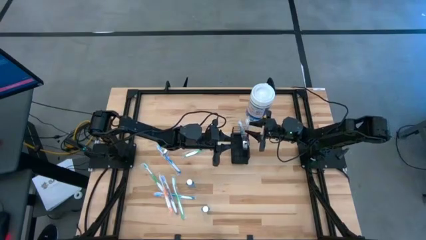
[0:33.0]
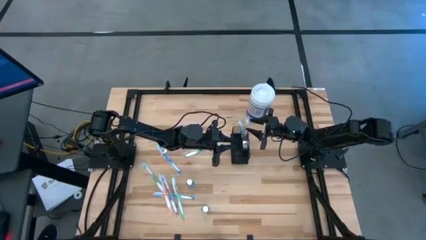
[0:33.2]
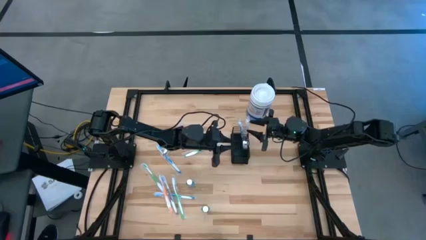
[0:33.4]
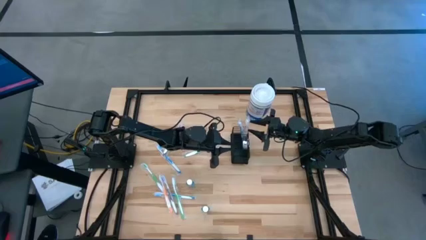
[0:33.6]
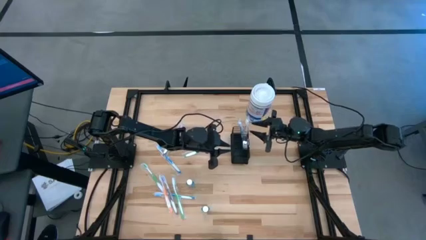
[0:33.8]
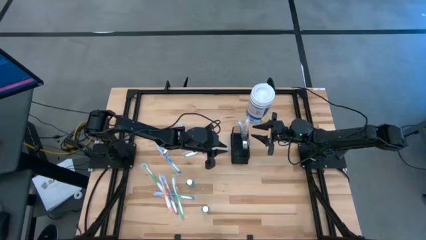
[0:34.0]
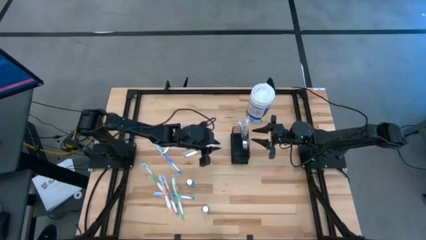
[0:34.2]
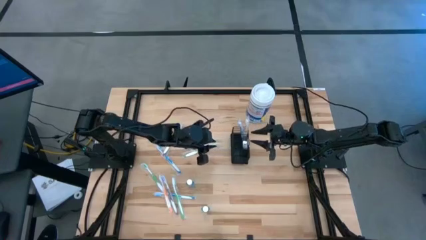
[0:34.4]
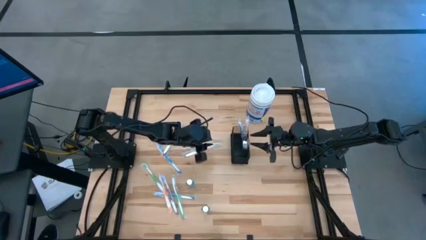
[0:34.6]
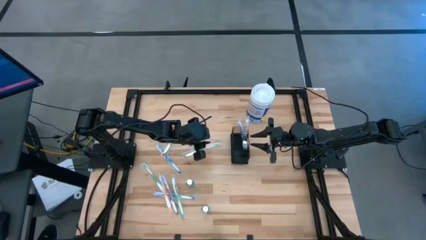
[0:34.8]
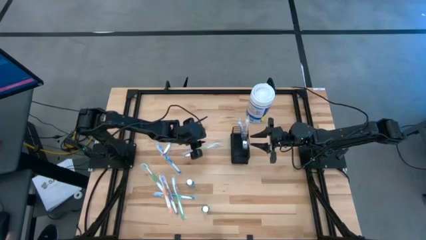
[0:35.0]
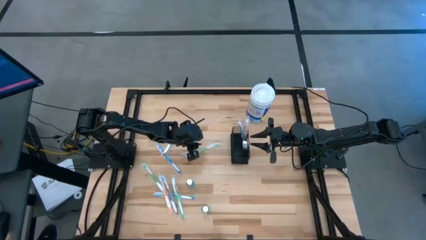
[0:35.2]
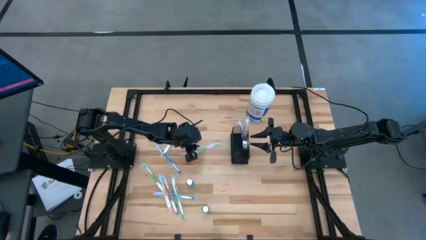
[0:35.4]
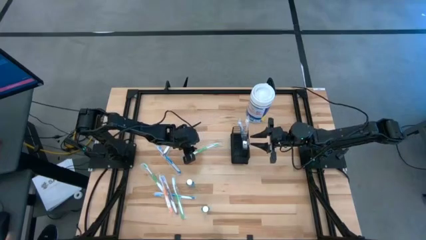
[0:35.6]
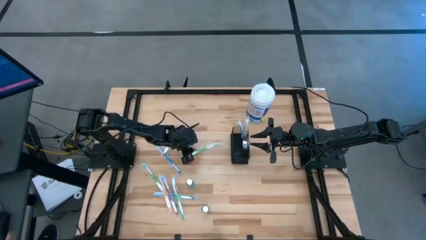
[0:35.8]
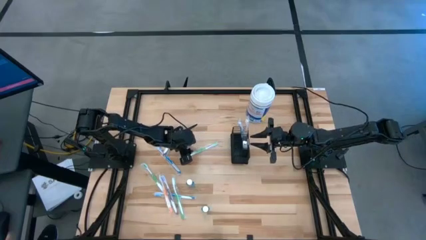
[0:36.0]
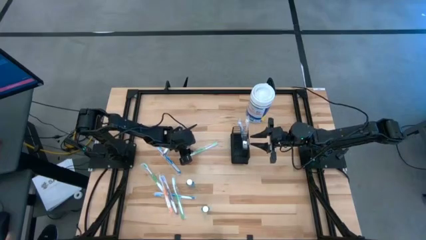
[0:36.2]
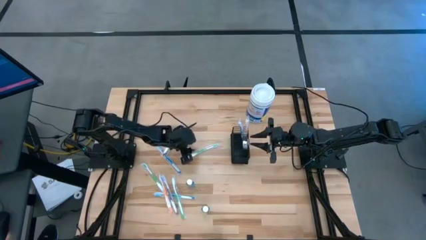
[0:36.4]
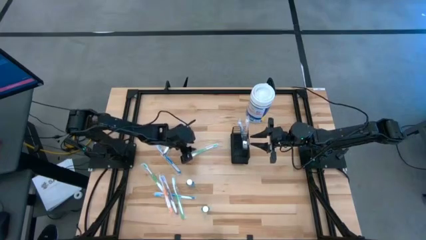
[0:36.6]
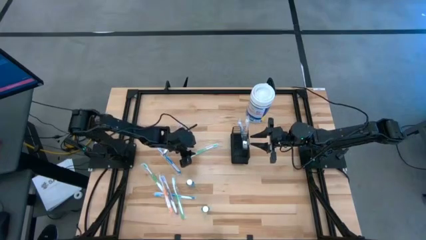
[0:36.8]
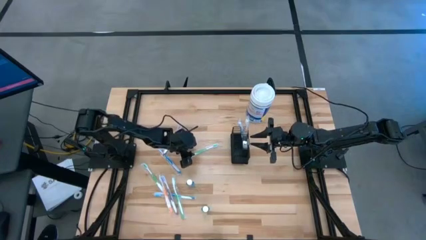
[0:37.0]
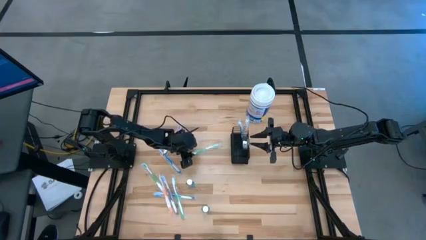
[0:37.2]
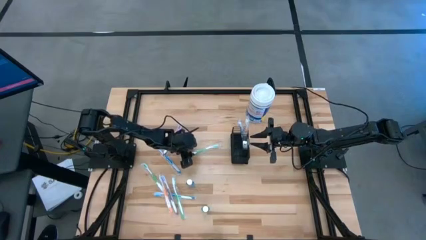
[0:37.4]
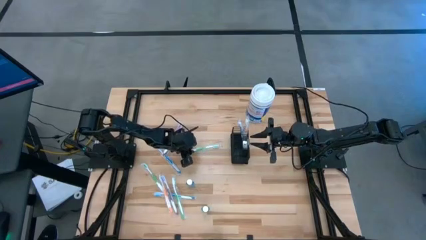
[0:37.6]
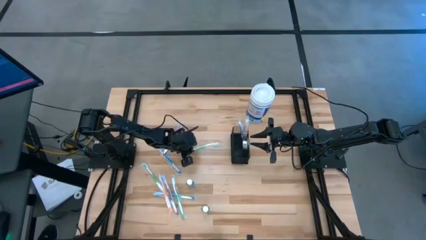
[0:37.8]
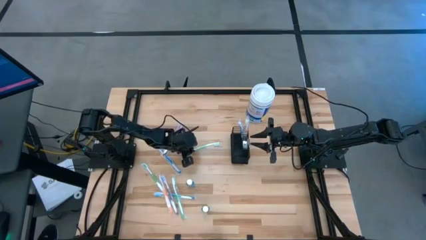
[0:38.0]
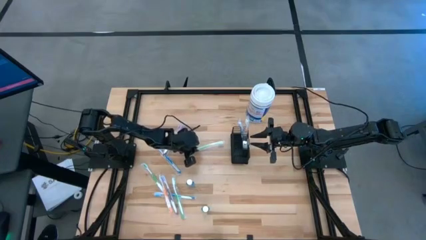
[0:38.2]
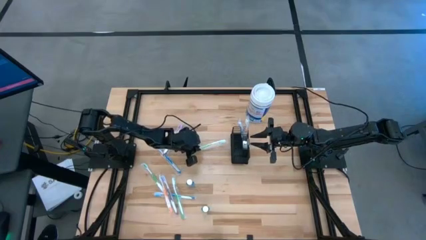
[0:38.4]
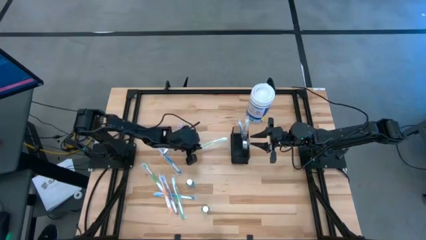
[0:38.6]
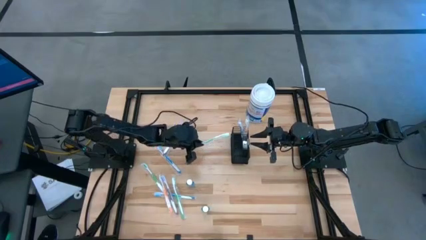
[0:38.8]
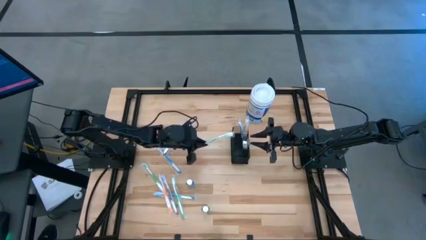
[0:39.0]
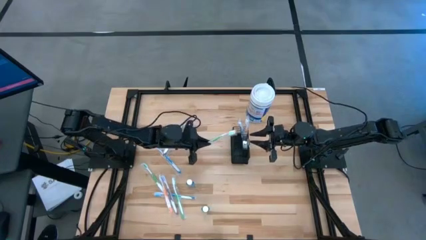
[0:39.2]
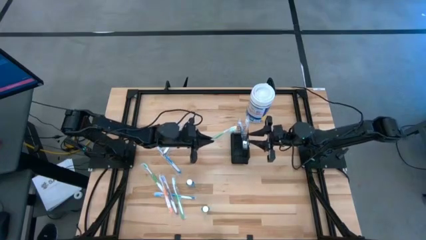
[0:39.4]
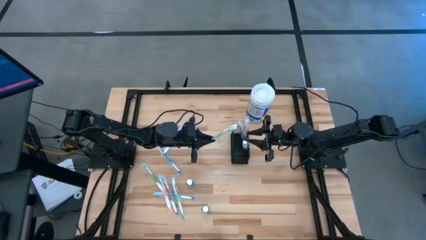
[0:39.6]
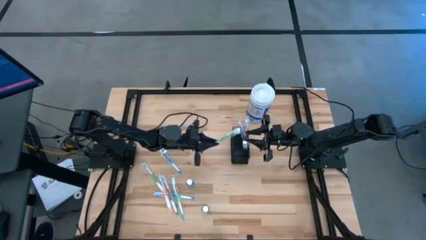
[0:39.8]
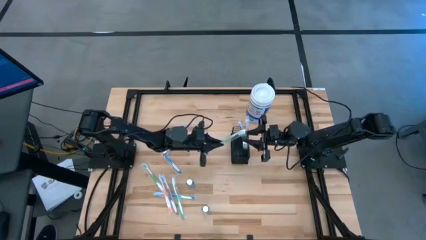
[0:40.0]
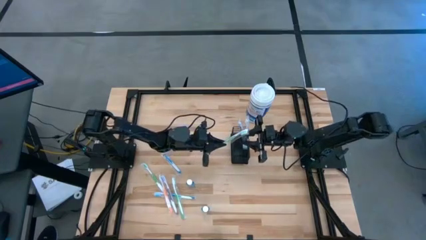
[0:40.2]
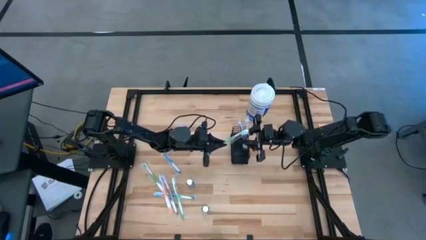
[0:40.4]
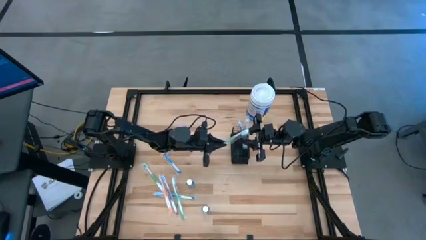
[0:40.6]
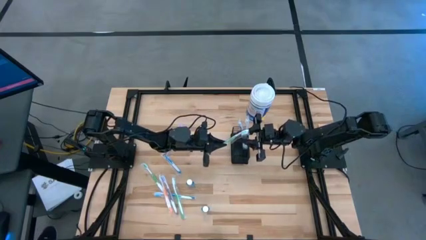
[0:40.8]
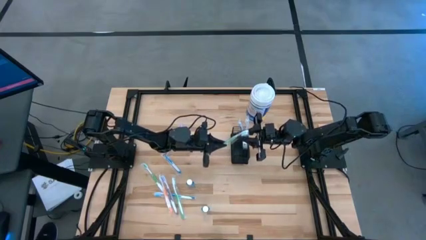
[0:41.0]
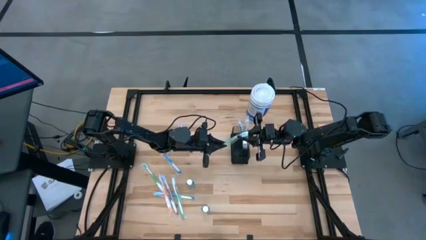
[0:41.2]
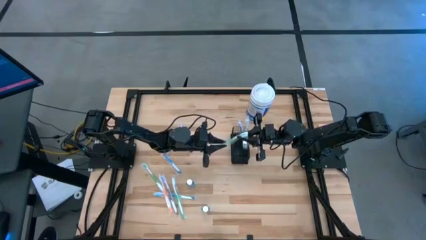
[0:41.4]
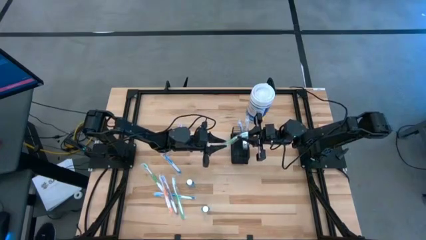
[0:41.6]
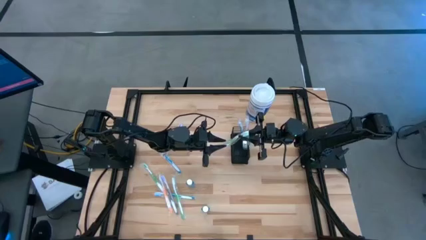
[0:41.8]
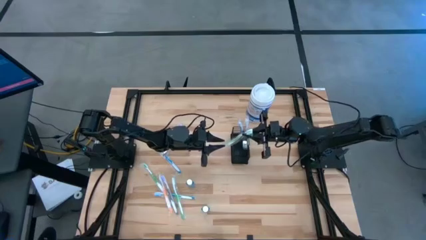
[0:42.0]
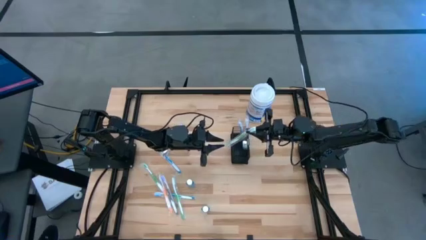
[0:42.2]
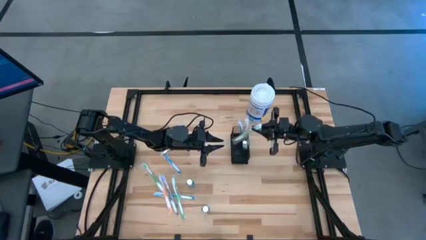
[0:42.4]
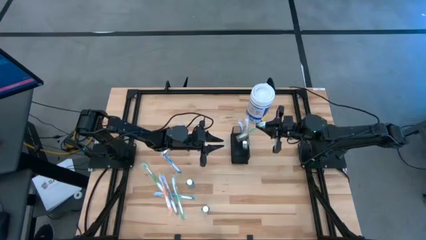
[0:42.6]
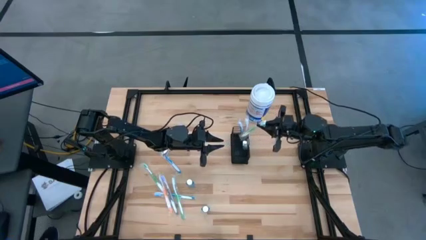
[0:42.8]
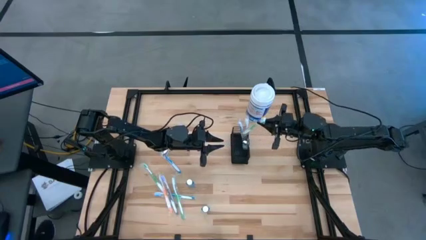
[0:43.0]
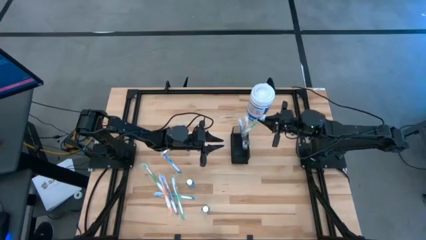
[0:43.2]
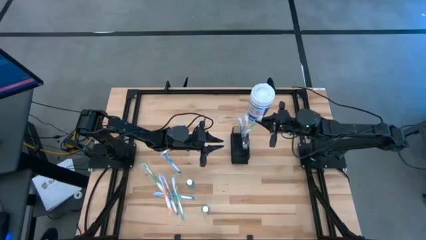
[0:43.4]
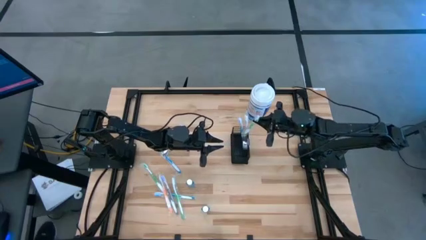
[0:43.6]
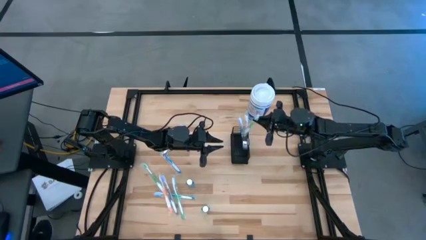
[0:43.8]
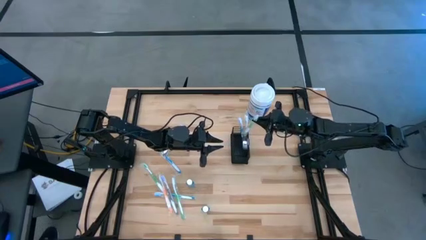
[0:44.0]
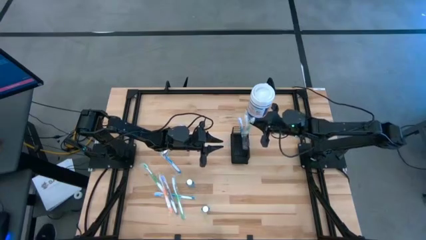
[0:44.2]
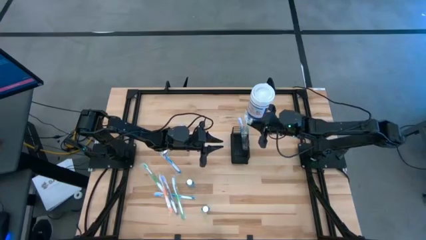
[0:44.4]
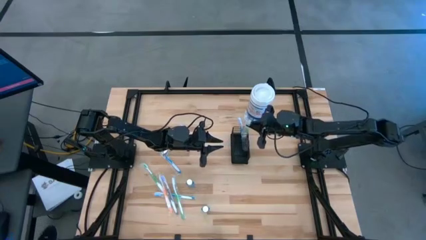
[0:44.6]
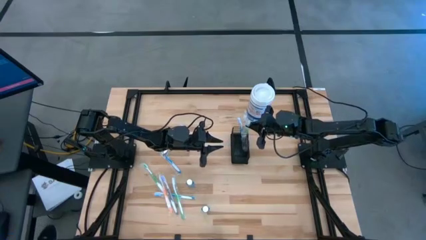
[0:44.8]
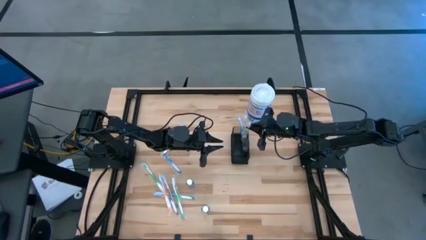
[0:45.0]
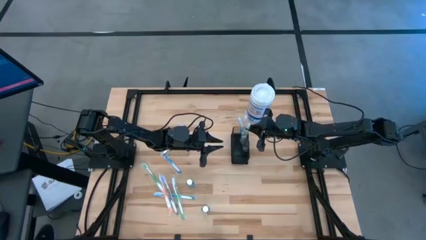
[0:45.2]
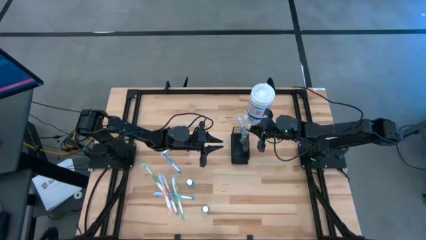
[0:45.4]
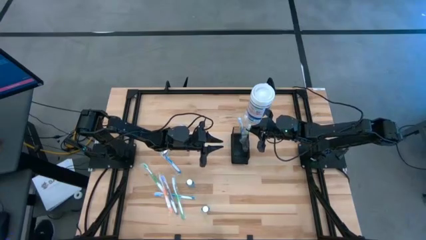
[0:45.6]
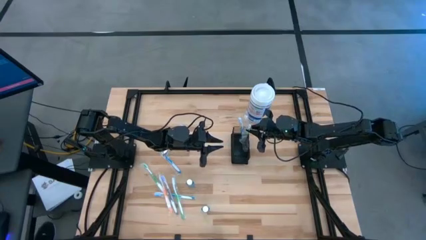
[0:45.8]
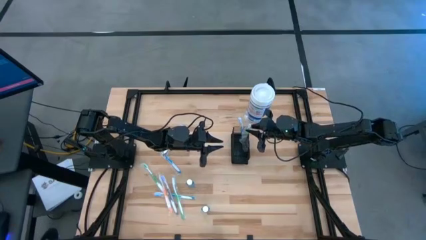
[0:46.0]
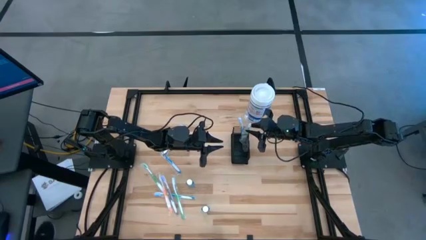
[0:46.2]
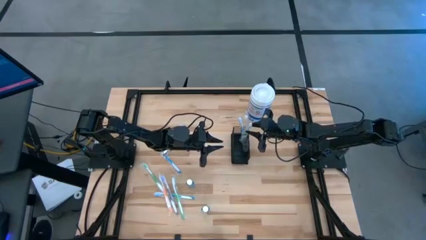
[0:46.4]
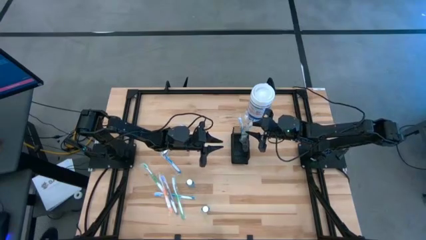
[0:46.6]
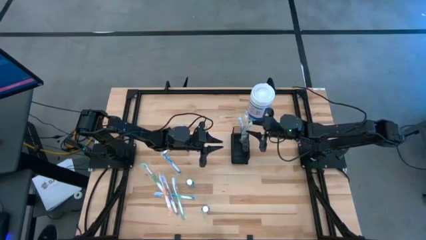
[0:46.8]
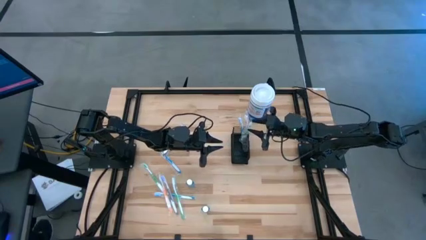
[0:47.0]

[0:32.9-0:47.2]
Task: Pick & Place toothbrushing station
Put the top green toothbrush into the wire mesh organizer

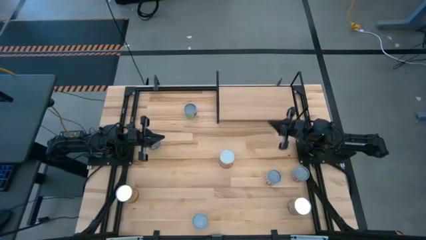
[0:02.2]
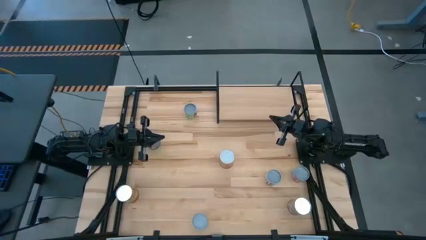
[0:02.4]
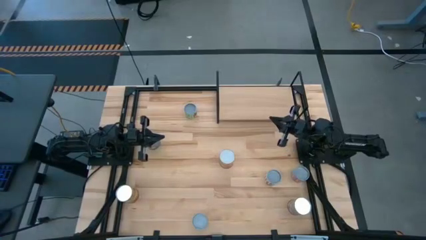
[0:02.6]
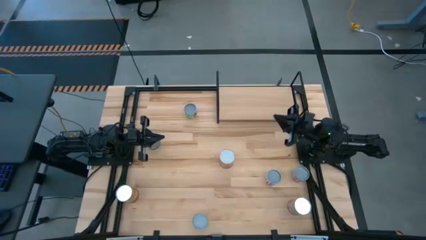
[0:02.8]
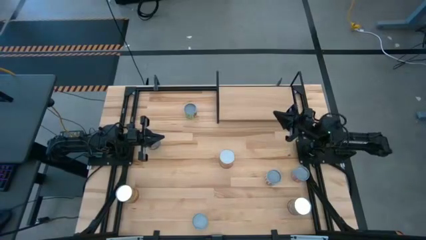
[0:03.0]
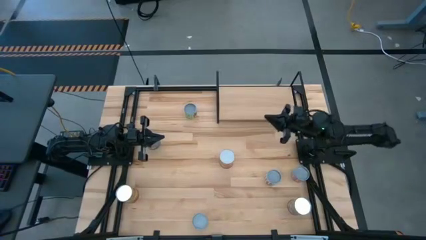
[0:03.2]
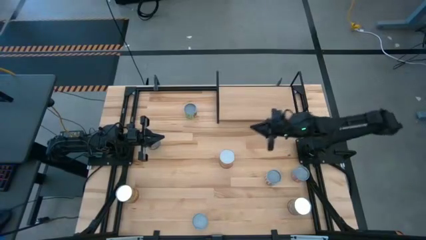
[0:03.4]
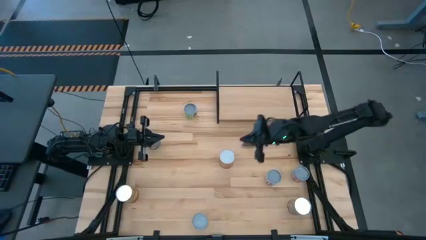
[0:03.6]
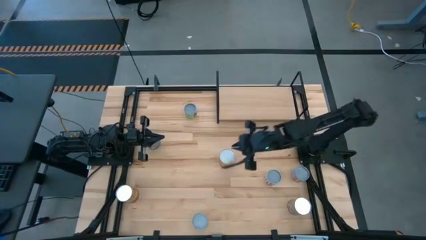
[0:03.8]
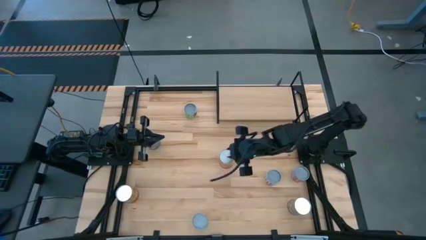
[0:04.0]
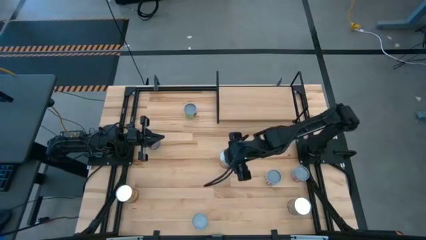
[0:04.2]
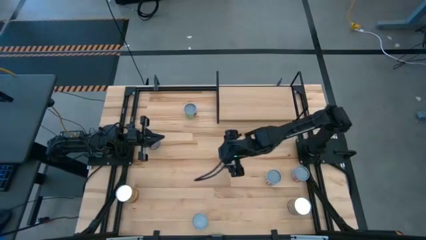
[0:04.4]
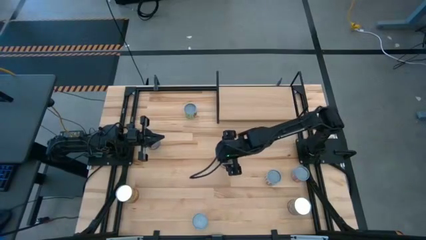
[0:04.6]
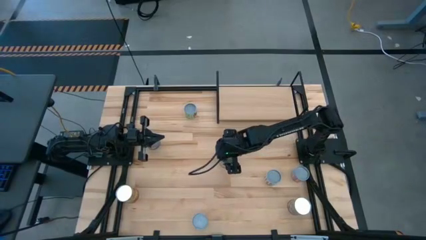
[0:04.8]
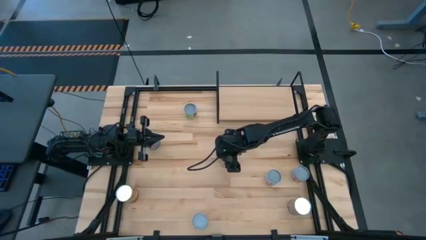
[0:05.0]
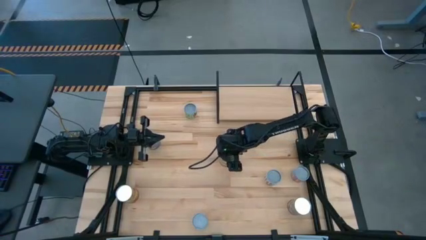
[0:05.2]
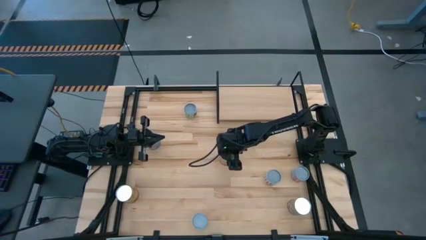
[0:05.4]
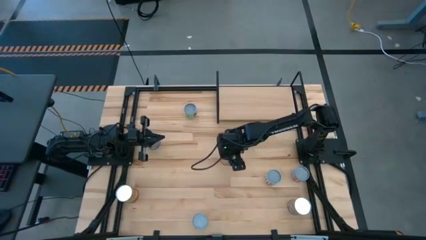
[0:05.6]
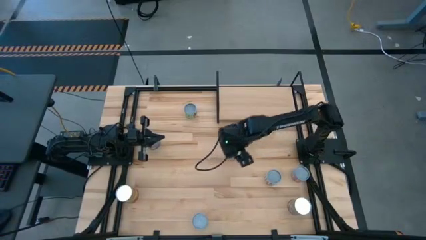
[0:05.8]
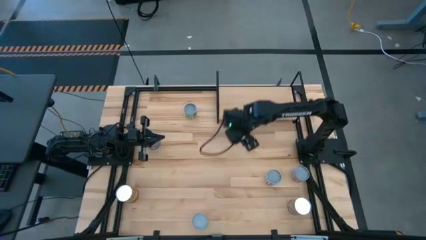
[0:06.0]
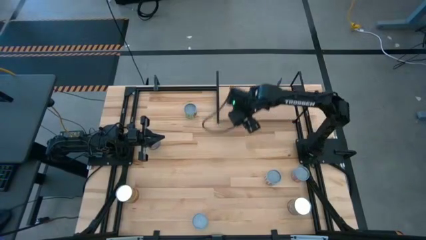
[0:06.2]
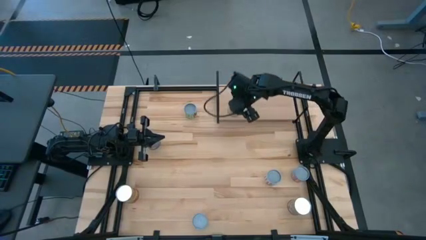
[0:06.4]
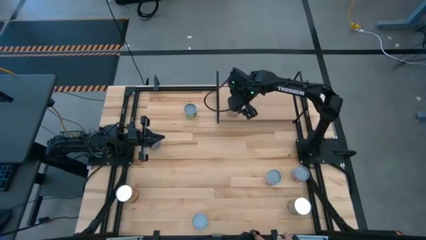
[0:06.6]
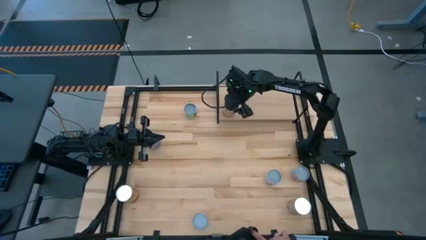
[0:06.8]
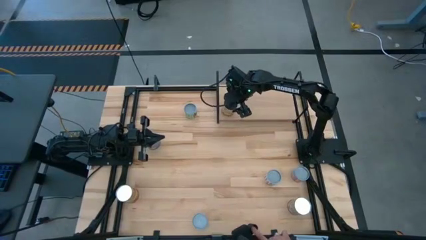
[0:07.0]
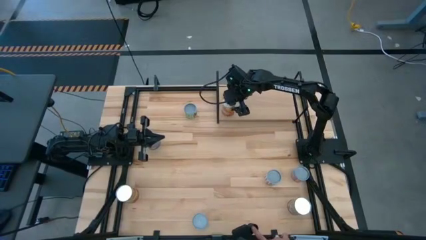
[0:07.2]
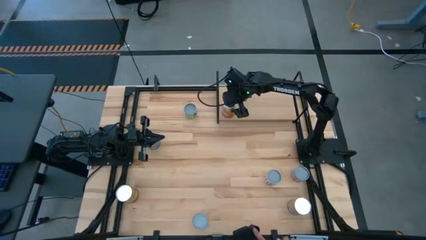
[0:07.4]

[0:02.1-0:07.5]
Task: Pick and place cans onto a shelf
Put the right big orange can on the shelf
